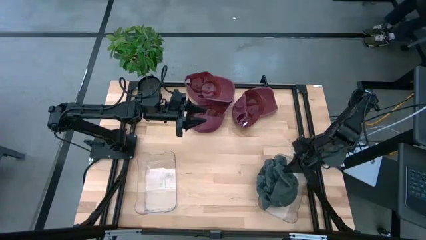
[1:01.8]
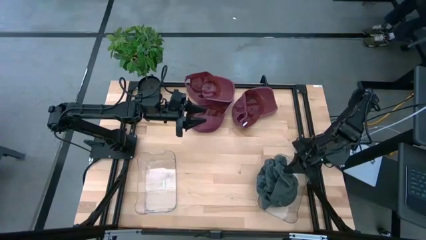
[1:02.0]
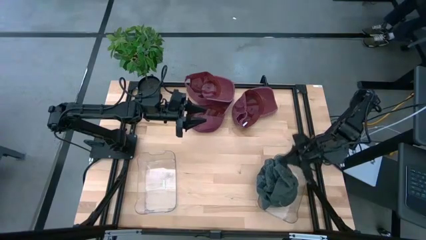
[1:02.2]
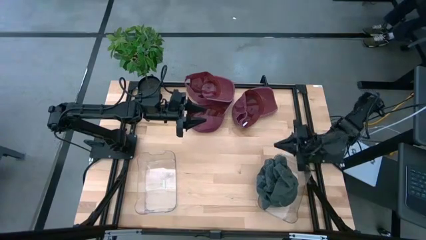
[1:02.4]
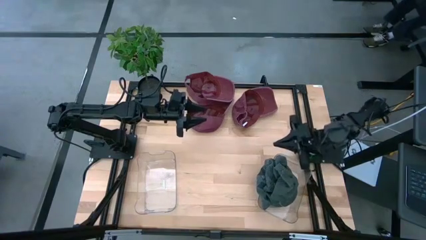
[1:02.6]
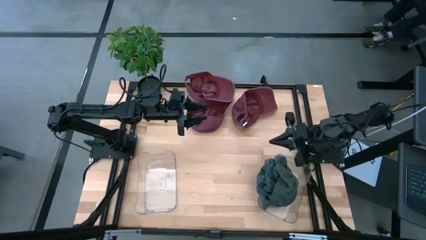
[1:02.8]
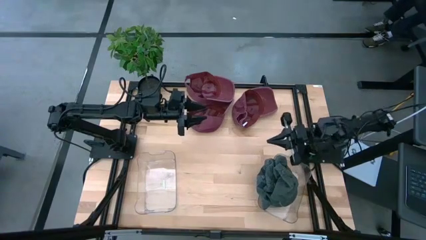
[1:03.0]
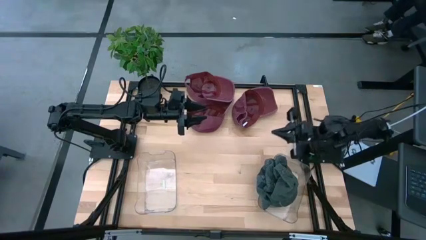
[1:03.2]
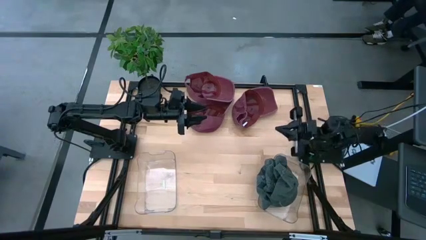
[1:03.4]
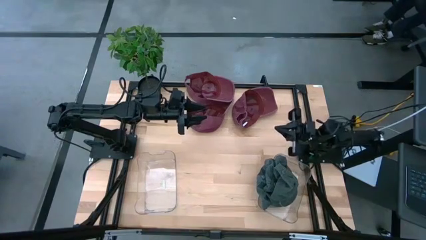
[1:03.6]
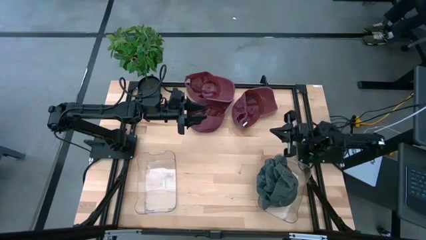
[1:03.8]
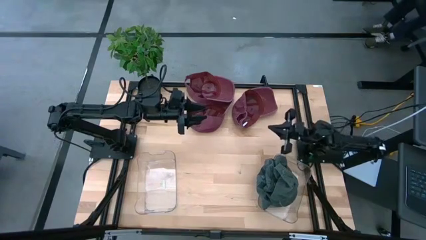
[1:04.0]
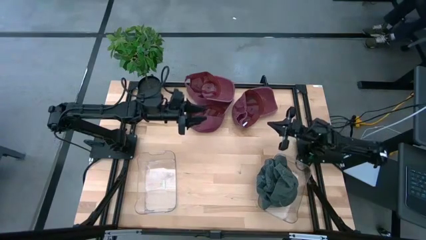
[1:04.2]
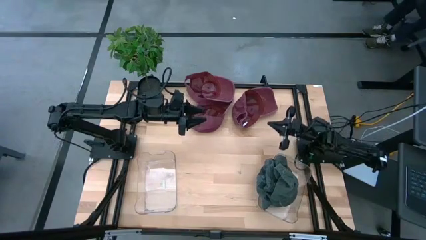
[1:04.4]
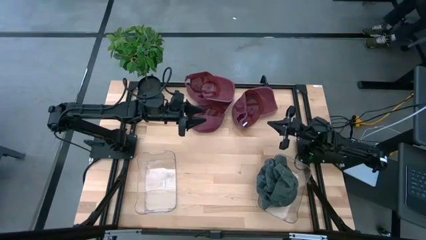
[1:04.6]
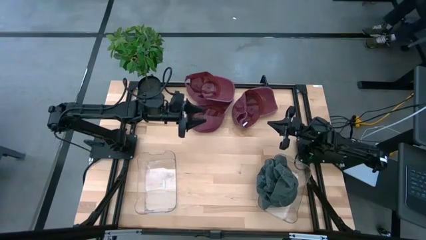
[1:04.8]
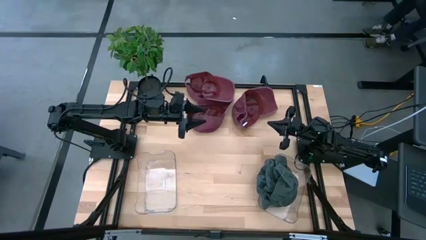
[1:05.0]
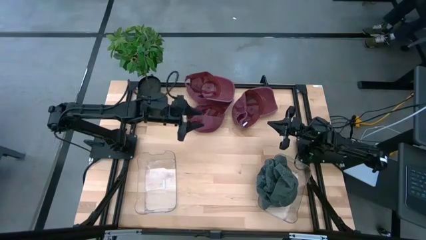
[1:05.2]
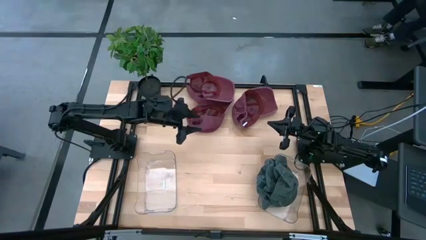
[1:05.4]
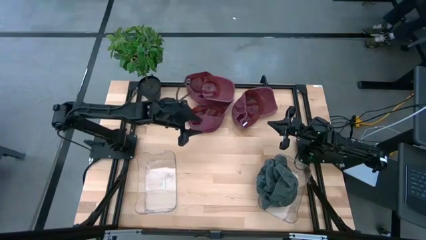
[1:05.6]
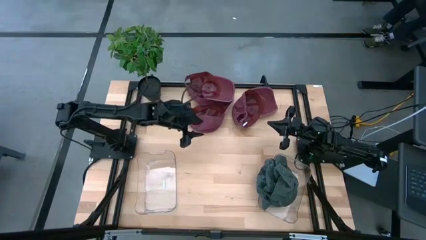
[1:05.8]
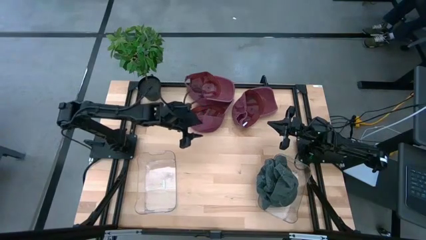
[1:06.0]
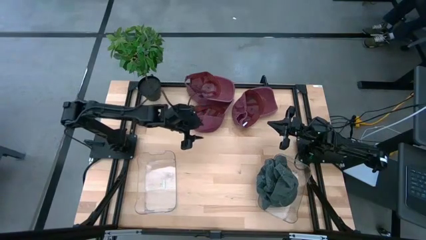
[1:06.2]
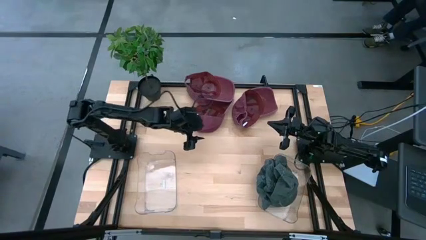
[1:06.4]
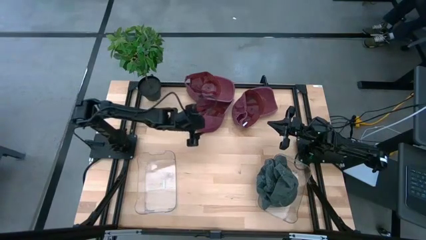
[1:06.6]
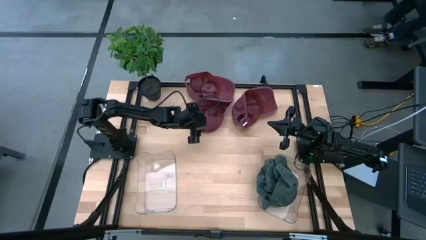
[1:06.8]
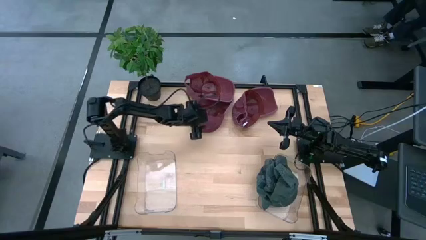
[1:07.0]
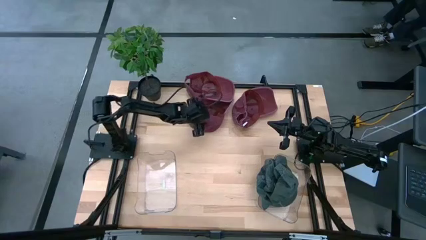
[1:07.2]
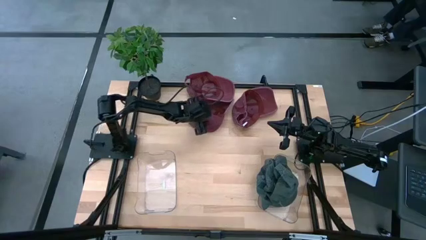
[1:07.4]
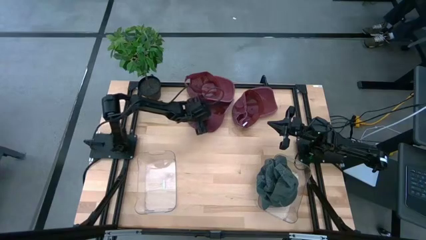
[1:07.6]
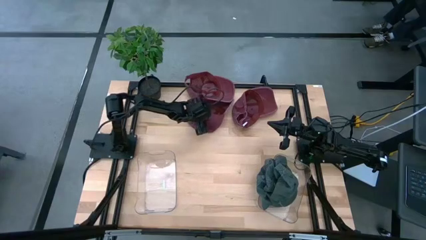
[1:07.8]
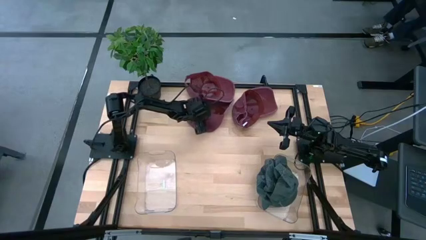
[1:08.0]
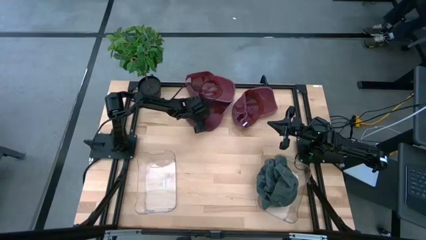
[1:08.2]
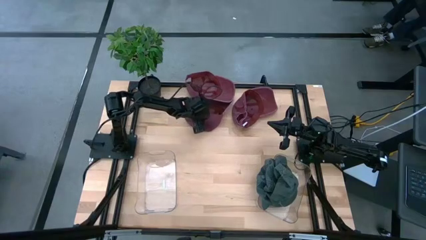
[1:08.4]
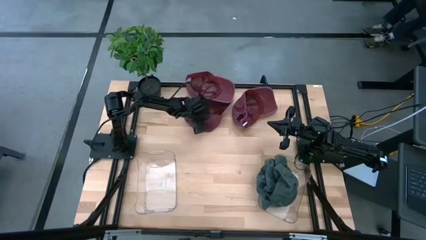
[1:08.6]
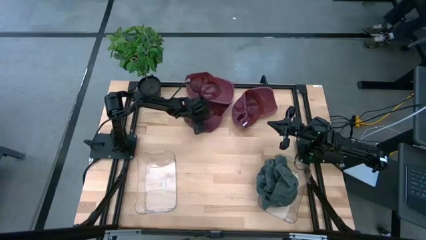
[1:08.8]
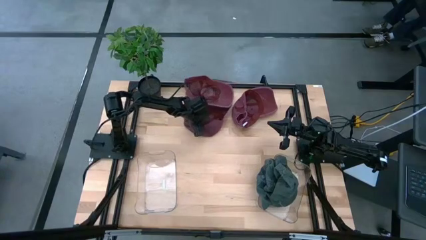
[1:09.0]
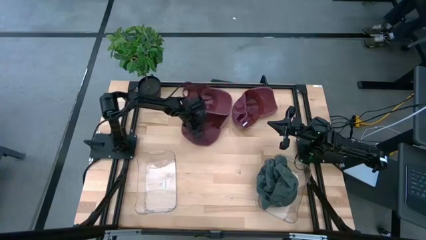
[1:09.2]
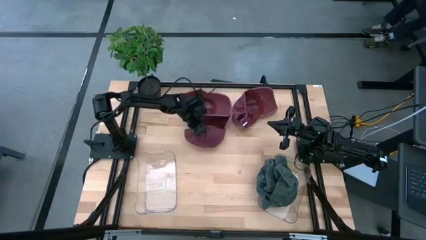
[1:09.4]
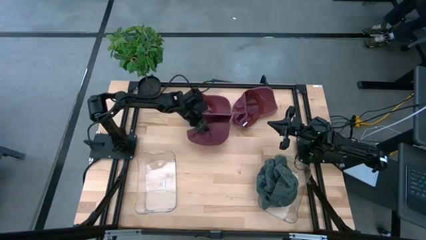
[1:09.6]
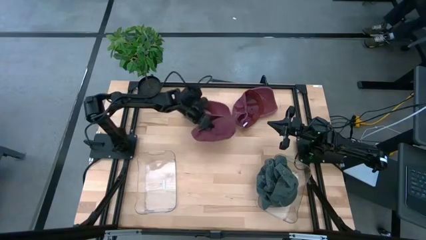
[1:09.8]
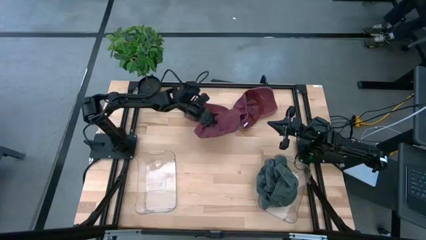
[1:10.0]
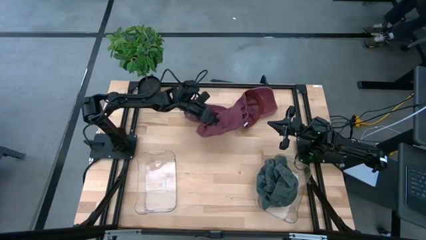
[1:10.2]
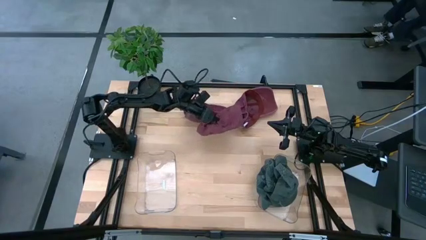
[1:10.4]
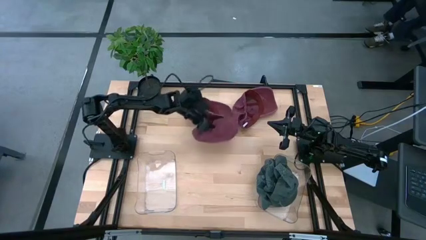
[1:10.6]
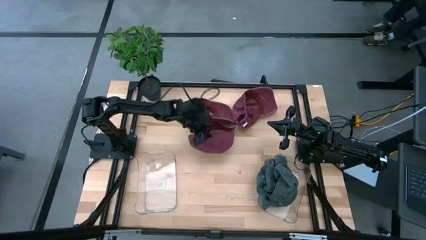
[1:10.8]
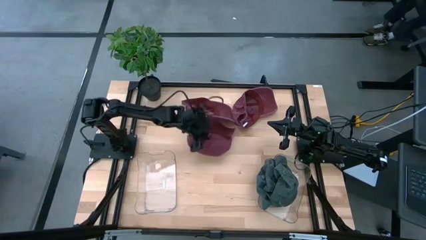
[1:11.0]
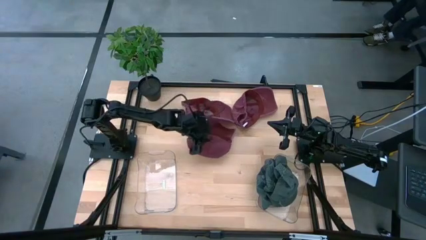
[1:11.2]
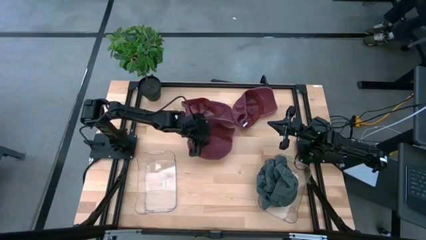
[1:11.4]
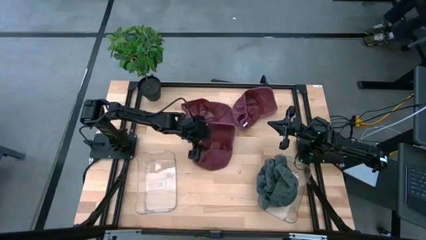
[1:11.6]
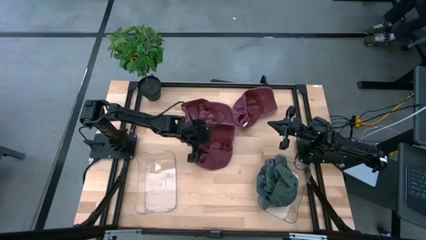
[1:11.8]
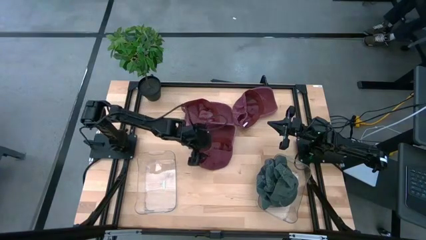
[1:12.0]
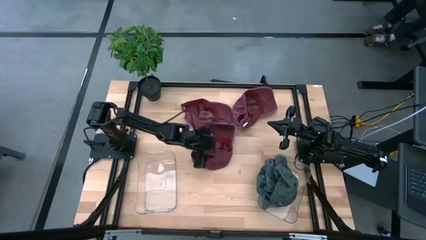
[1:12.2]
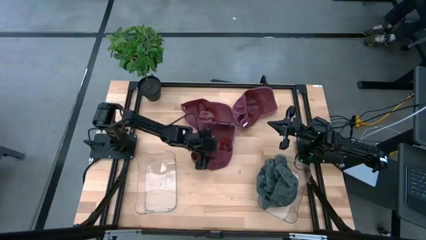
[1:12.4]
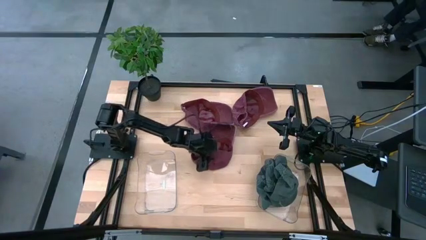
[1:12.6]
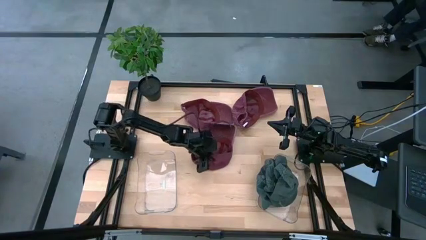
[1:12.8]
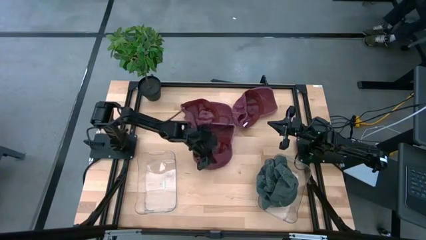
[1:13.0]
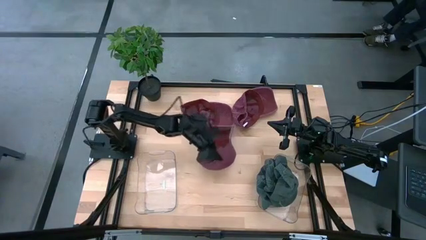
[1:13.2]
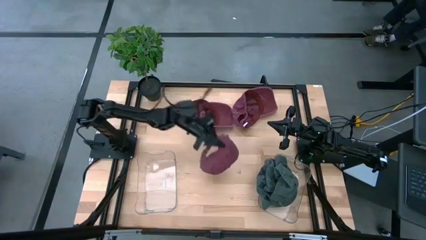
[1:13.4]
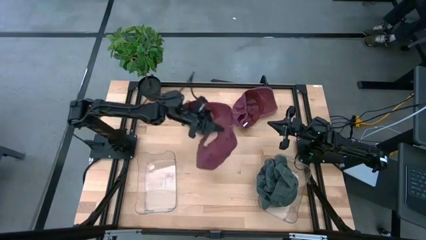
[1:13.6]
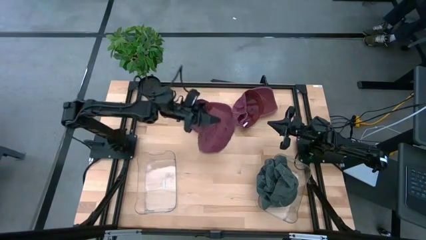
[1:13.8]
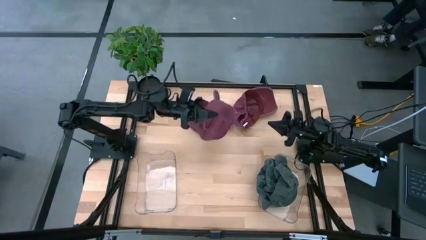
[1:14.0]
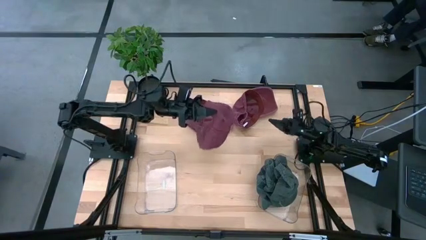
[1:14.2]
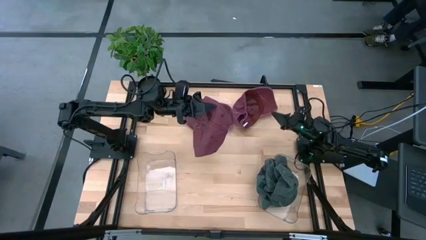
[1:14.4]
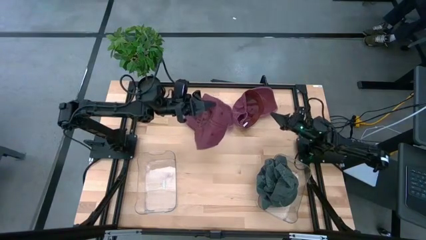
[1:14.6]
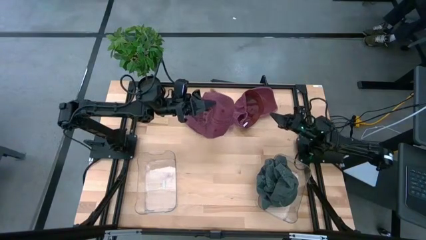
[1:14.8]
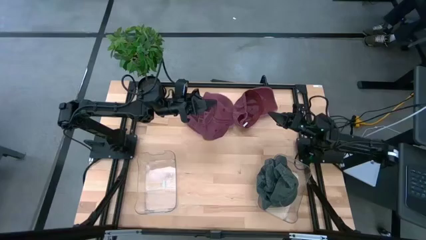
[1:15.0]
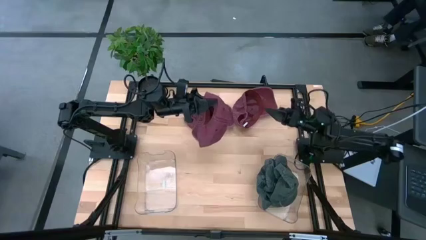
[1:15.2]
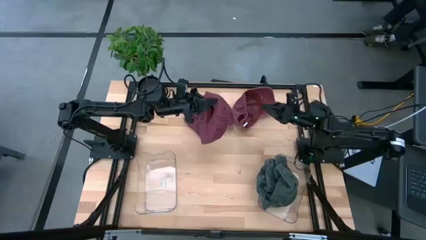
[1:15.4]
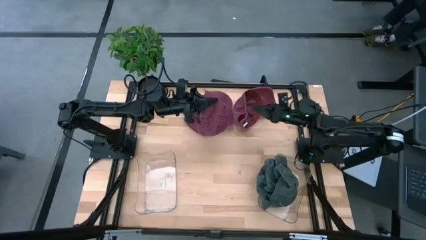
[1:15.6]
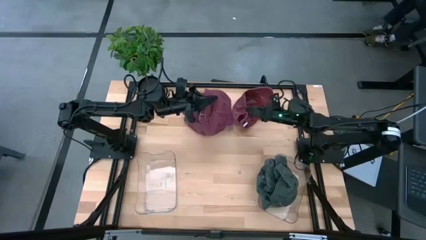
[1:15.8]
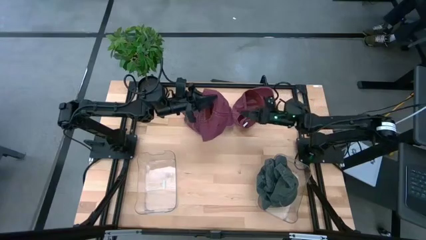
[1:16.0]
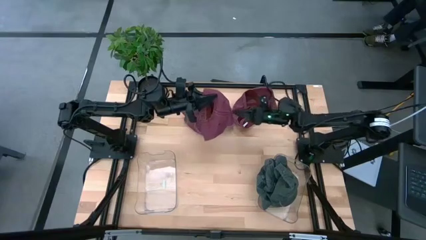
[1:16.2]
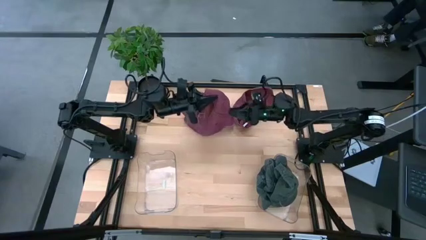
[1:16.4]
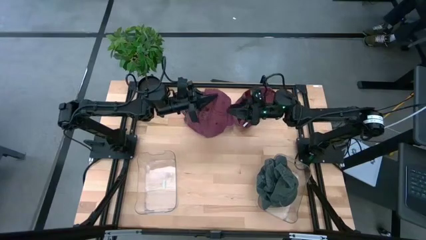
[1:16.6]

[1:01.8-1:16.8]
Task: Pick & Place hat
Put the bottom left red cap into the left transparent bin
